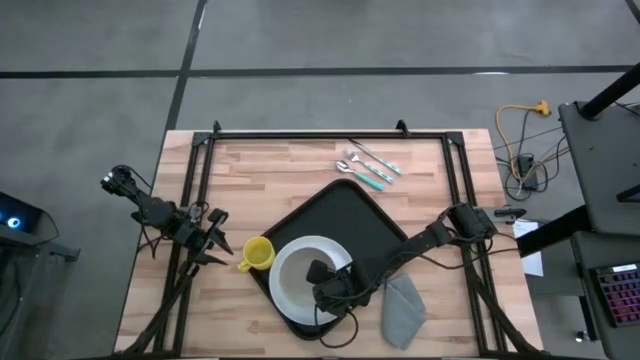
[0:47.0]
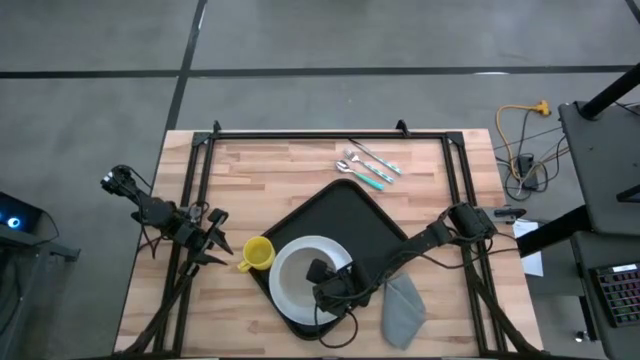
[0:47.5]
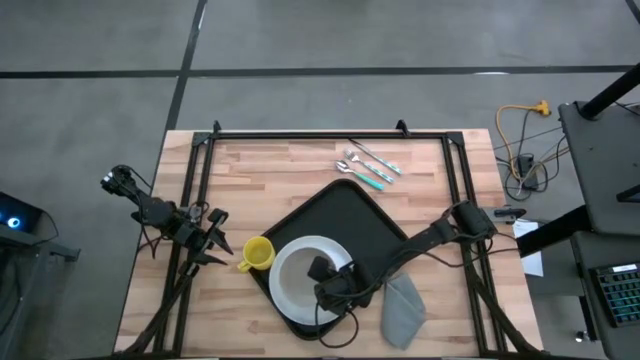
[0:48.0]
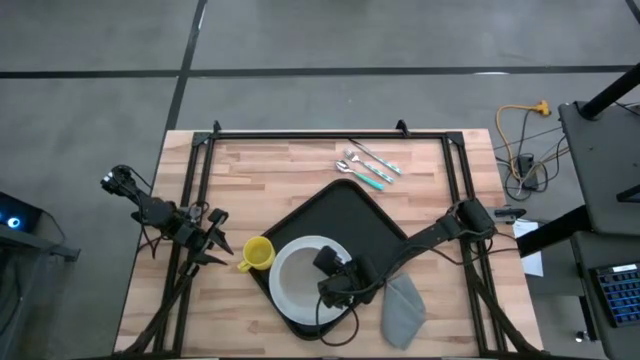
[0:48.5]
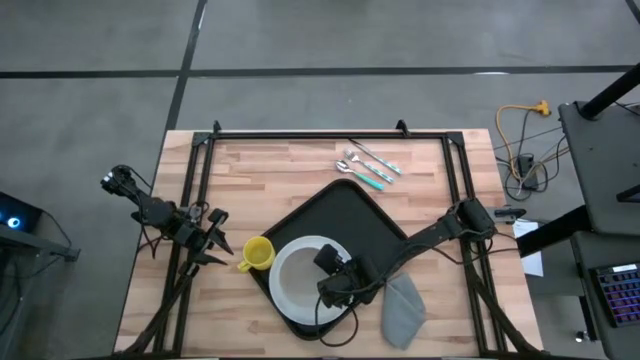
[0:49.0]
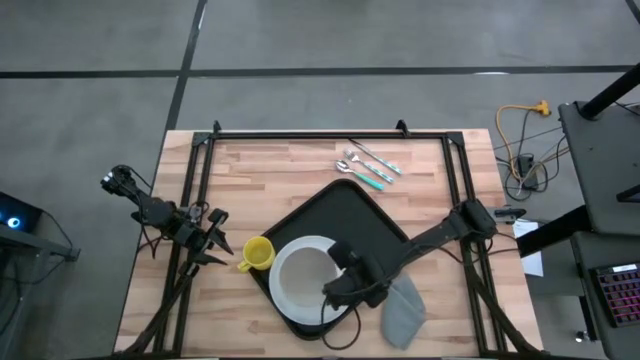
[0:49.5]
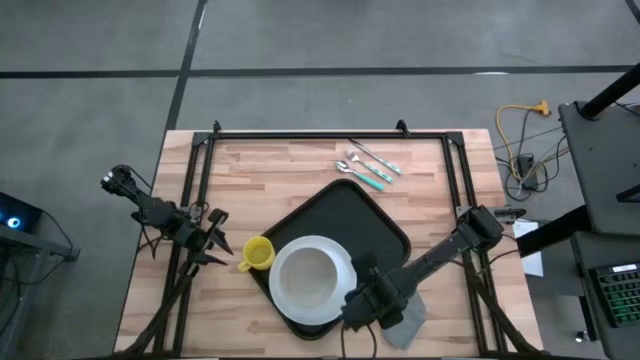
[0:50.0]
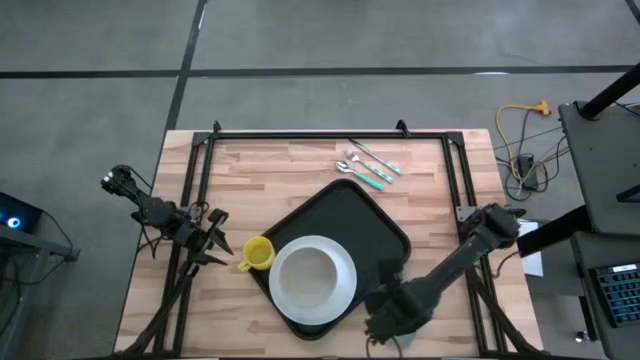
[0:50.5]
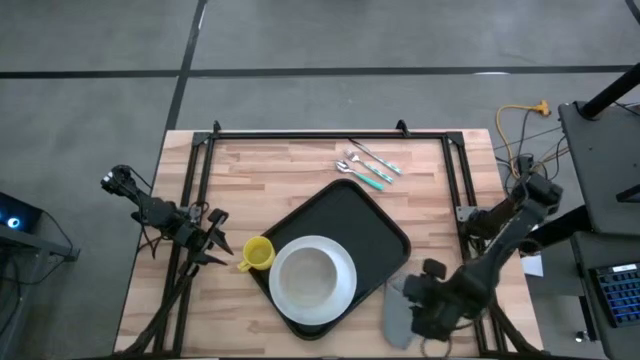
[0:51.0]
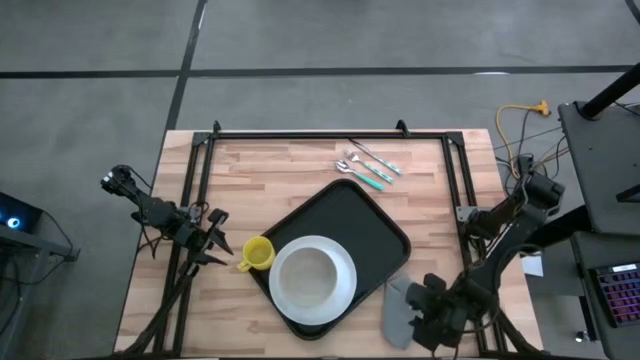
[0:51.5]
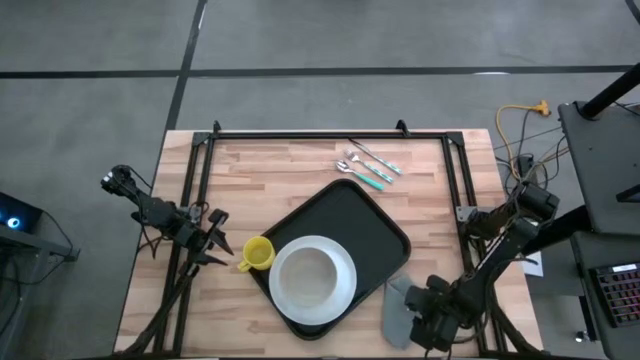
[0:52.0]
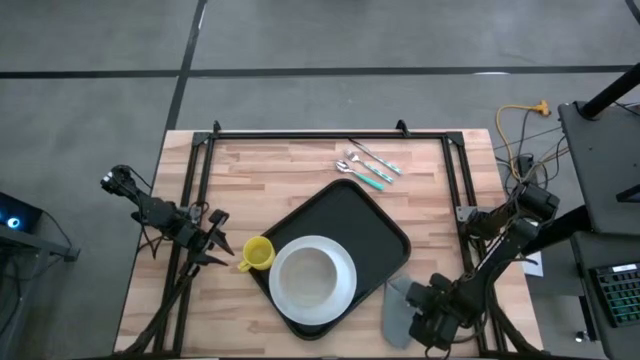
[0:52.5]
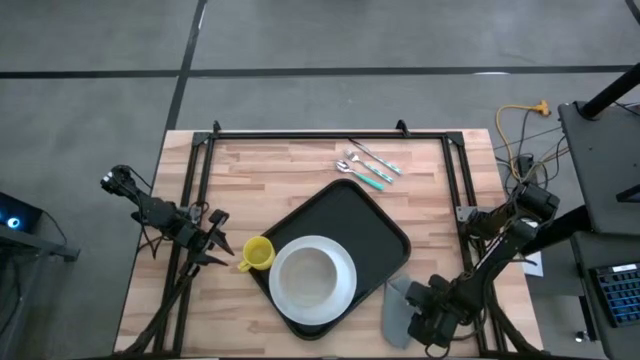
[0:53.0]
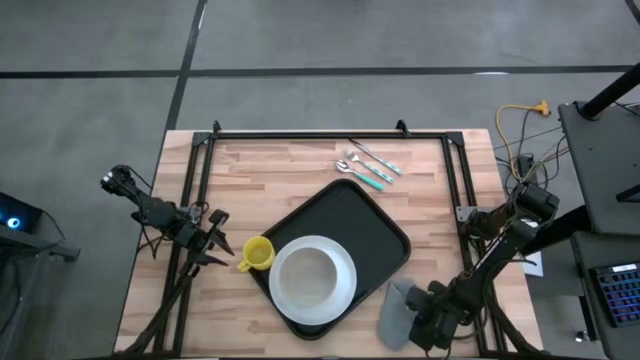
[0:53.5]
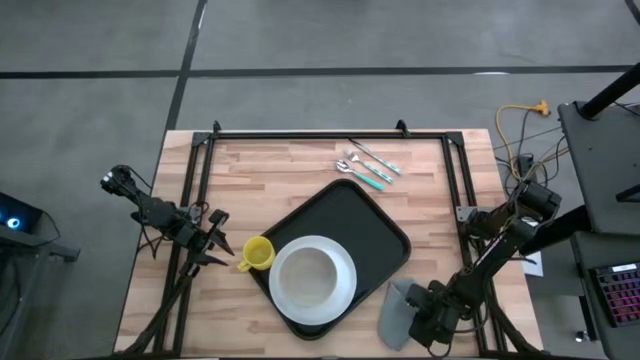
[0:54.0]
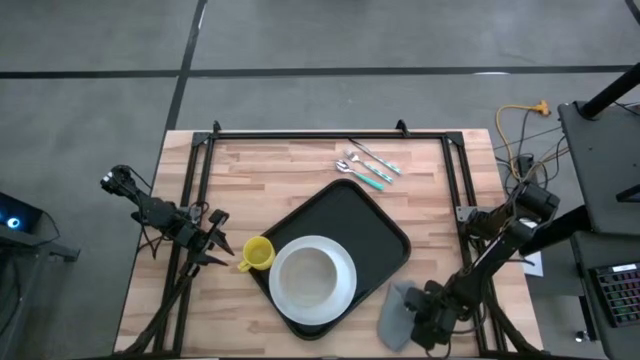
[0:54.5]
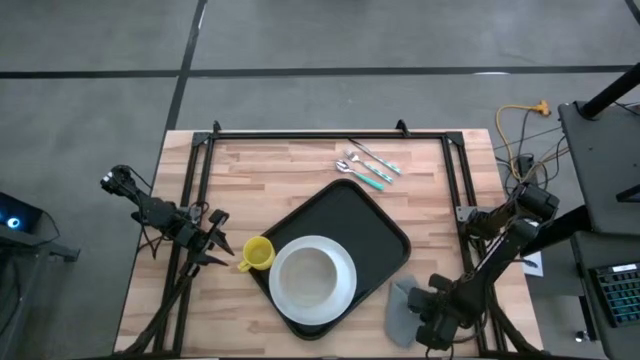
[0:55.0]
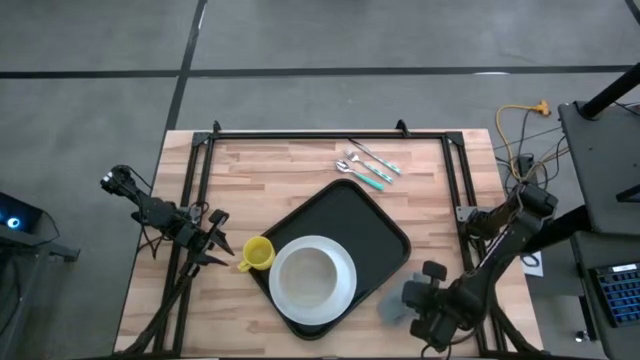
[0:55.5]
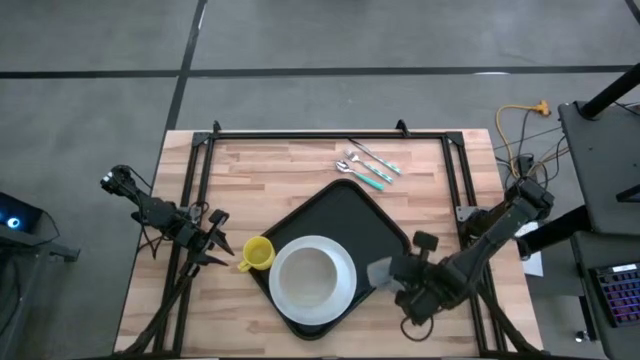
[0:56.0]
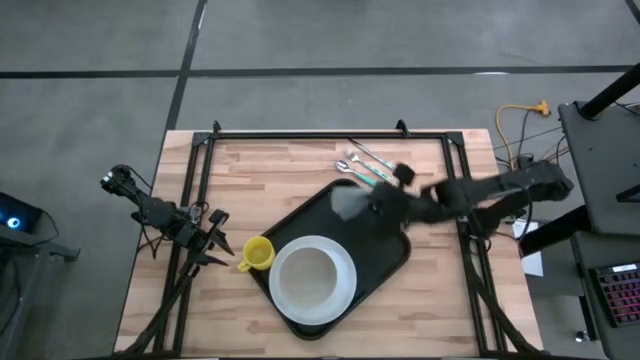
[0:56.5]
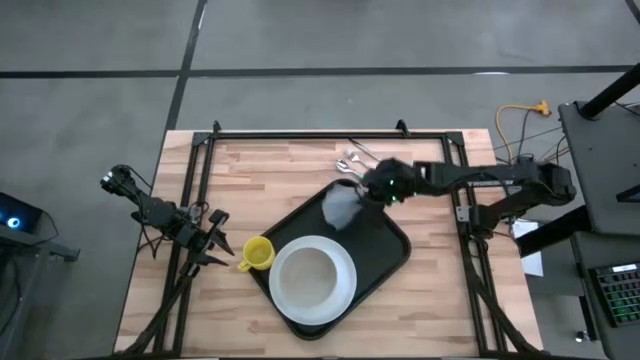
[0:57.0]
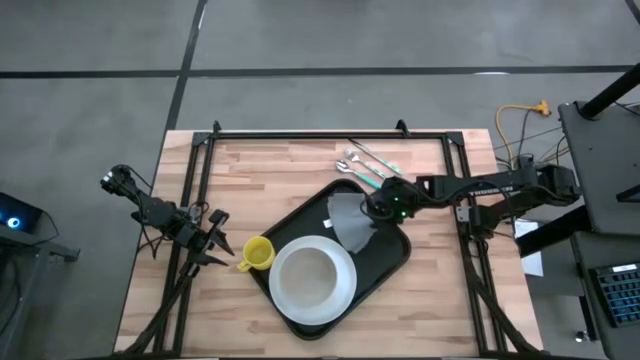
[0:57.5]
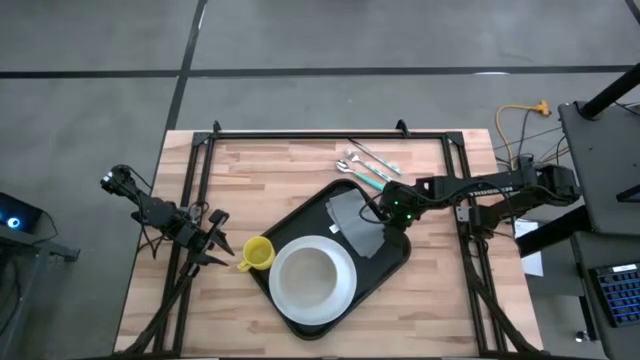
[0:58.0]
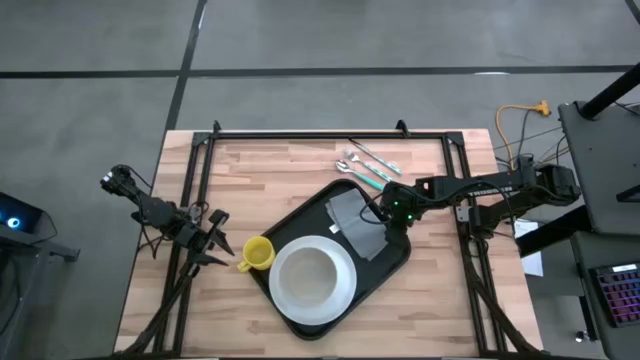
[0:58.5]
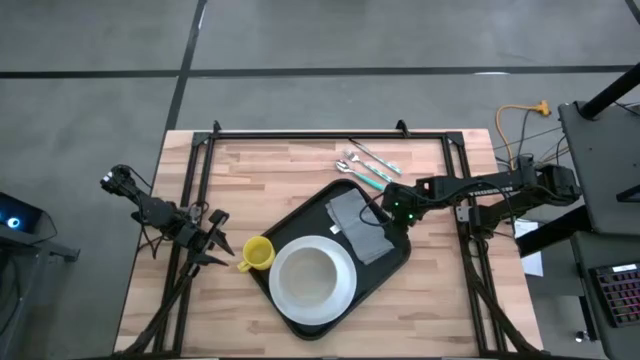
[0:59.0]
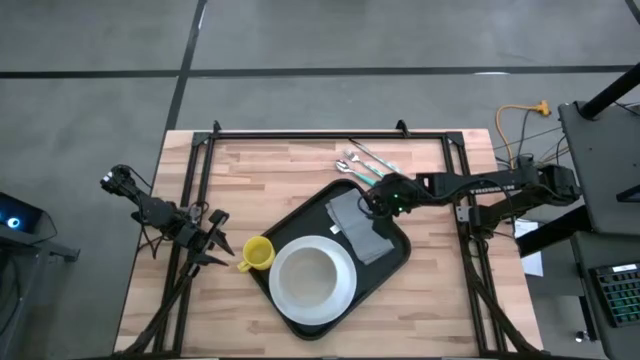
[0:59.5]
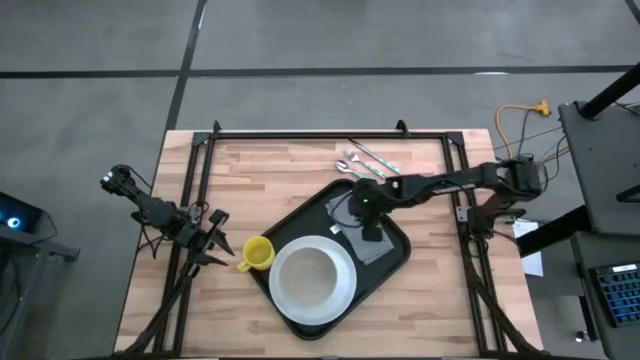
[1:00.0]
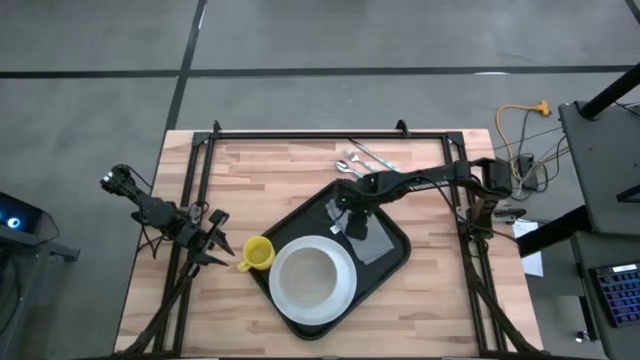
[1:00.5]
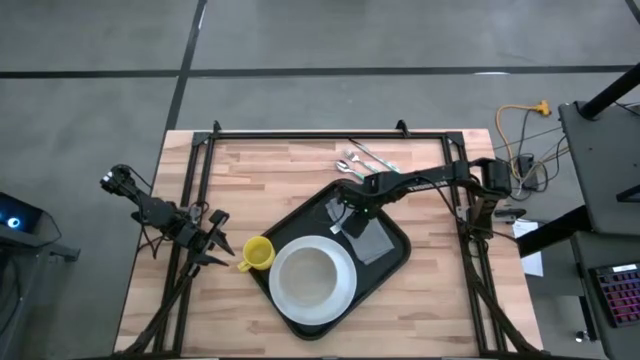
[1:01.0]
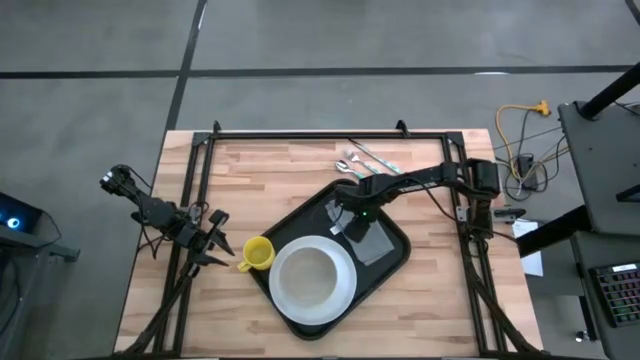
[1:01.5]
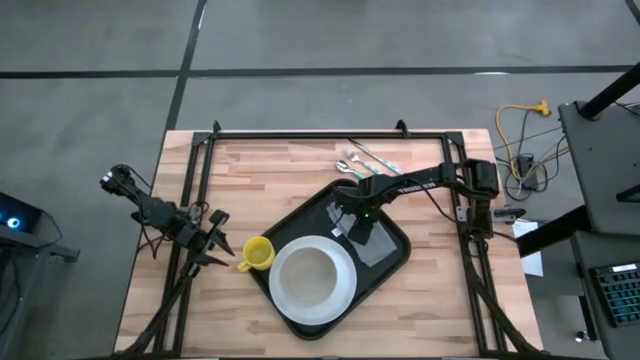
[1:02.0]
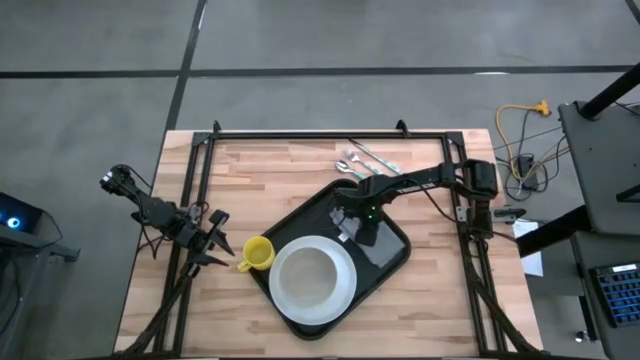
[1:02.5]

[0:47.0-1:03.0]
Task: Set up tray
Put the gray napkin on the black tray to the right of the white plate

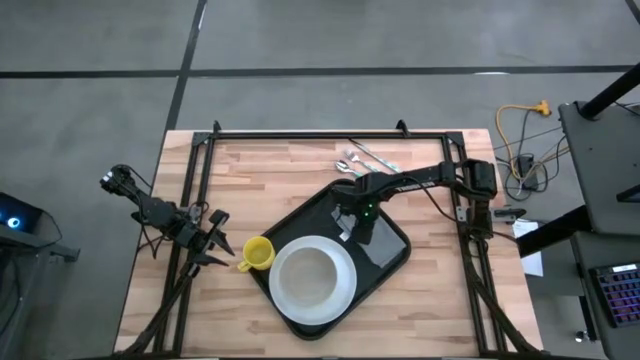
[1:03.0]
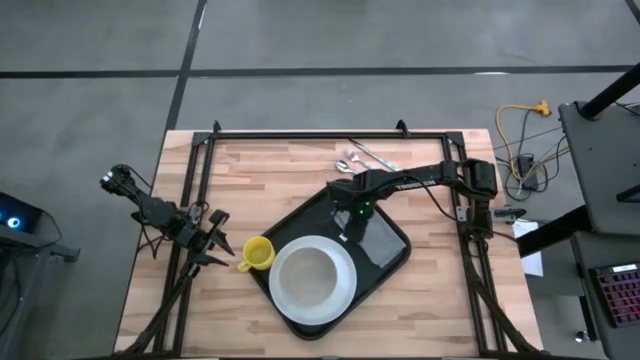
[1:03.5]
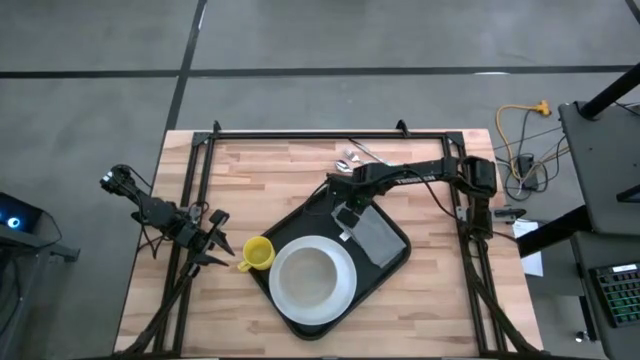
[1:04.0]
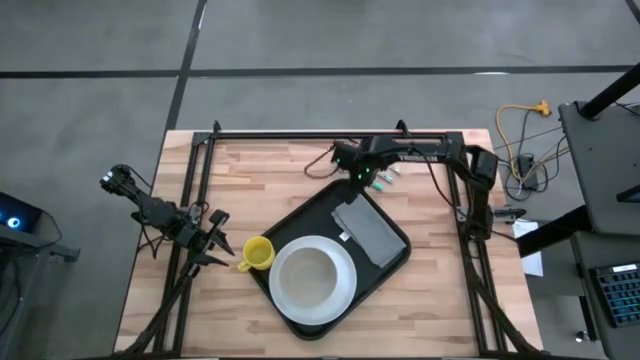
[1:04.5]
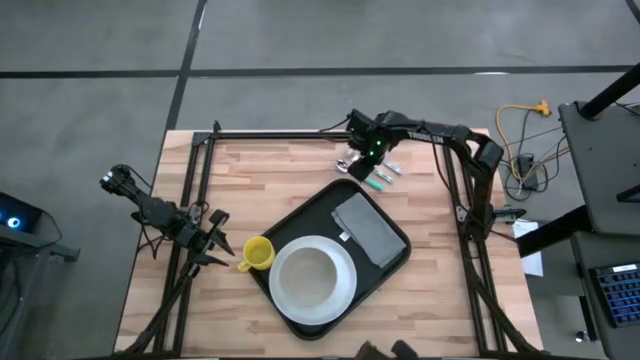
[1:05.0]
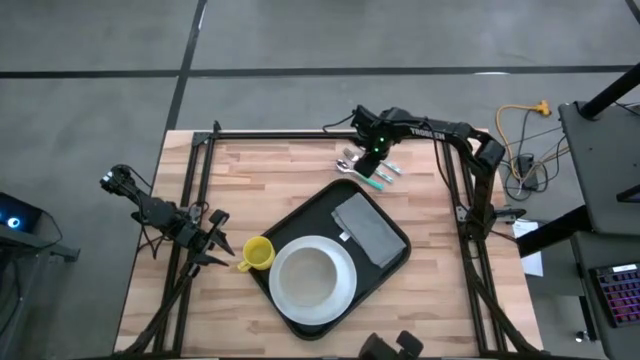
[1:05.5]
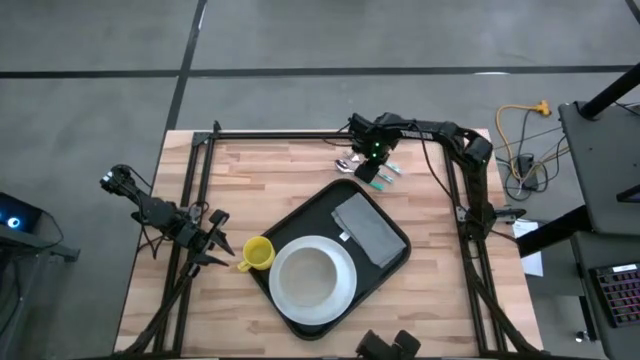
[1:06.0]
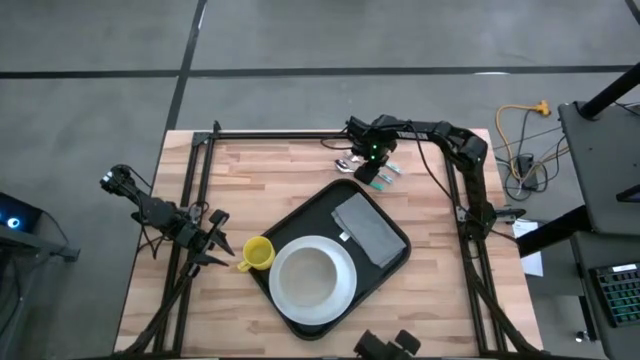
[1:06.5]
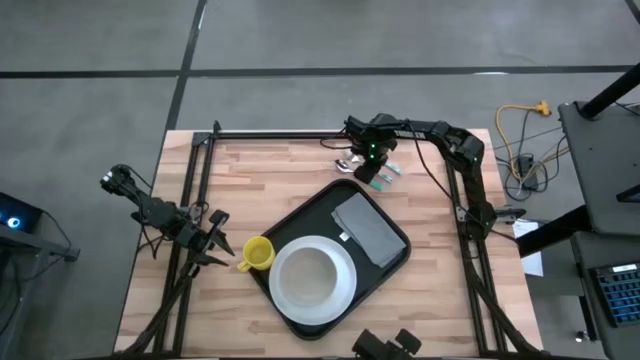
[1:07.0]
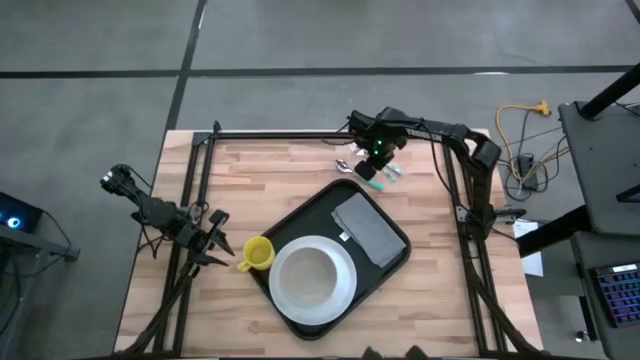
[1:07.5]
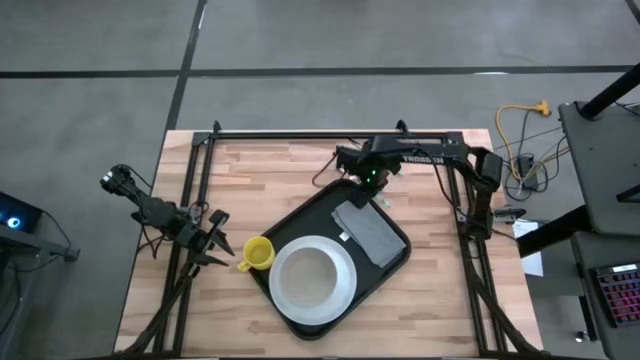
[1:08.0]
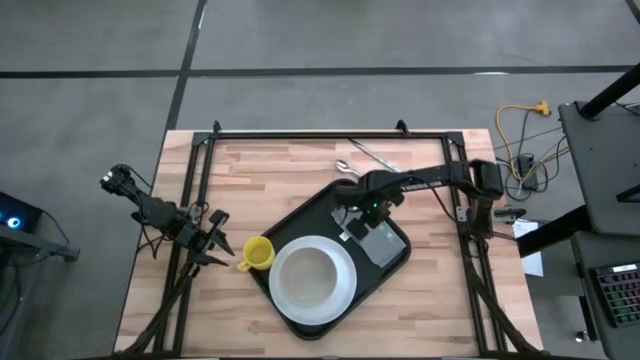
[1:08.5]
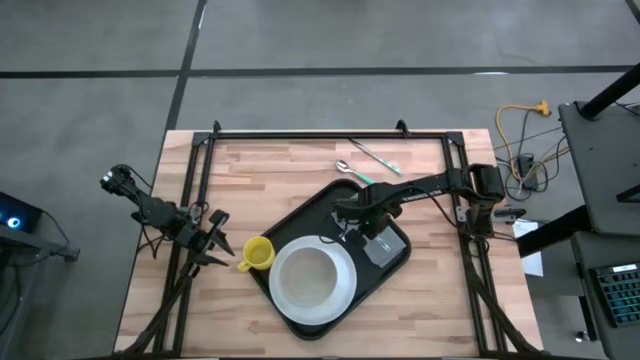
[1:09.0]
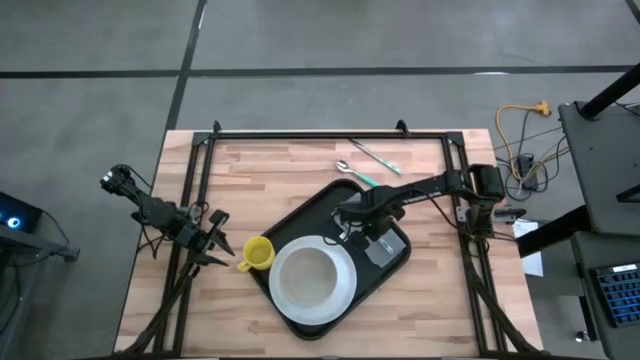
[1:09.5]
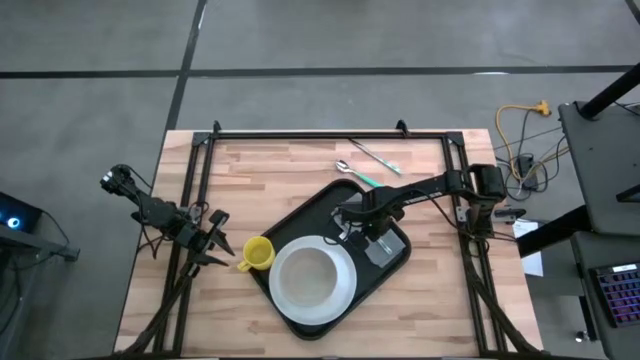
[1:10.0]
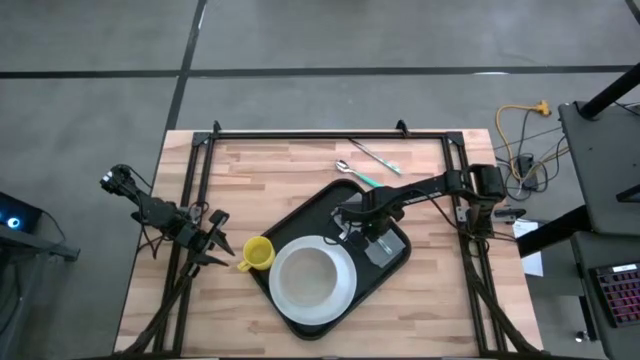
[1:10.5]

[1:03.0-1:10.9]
Put the blue fork on the gray napkin on the black tray
